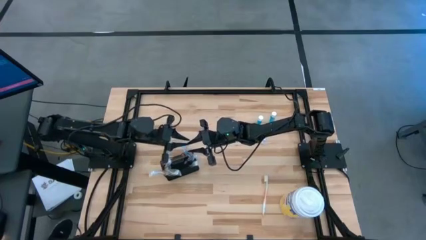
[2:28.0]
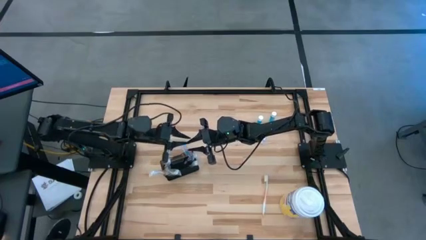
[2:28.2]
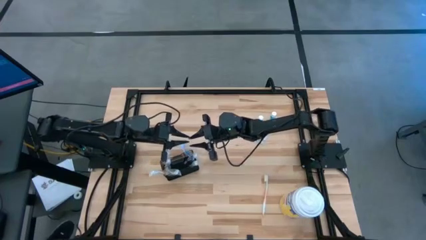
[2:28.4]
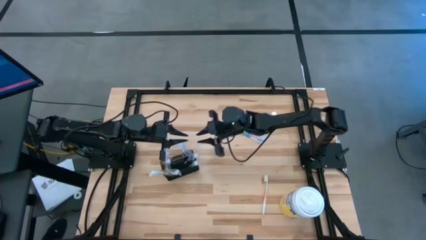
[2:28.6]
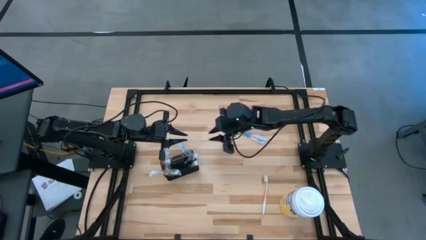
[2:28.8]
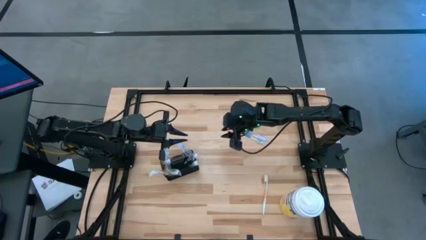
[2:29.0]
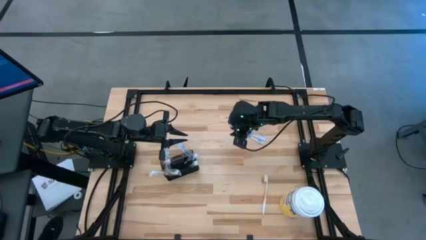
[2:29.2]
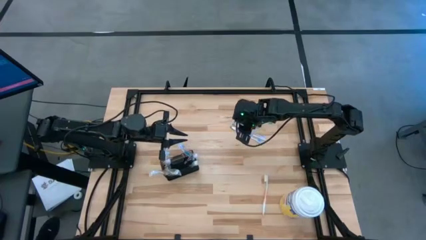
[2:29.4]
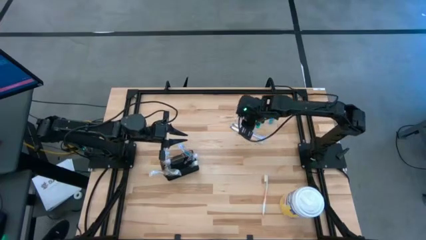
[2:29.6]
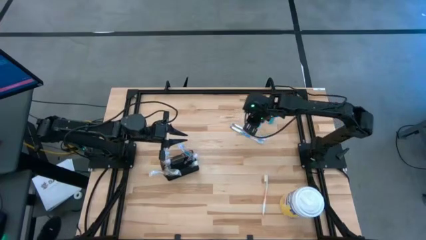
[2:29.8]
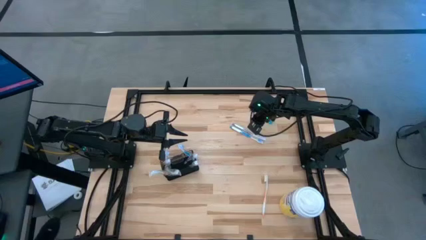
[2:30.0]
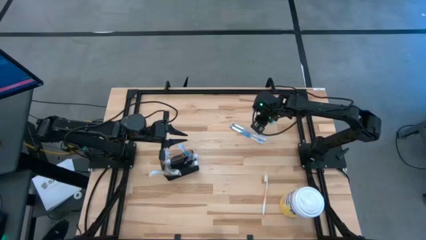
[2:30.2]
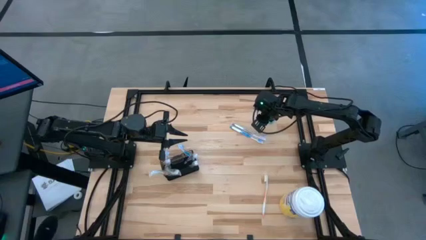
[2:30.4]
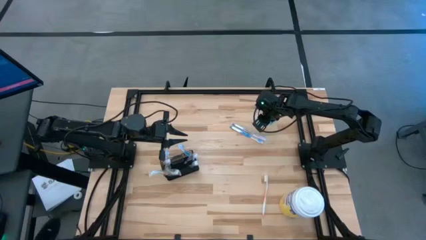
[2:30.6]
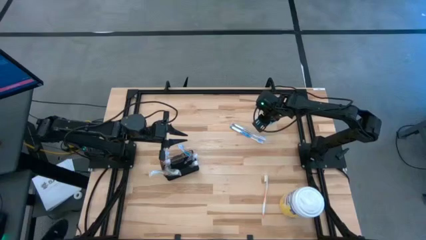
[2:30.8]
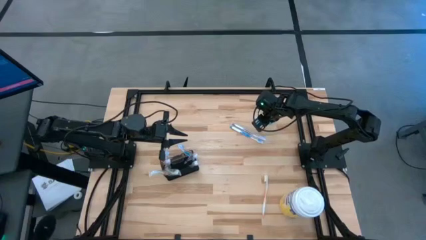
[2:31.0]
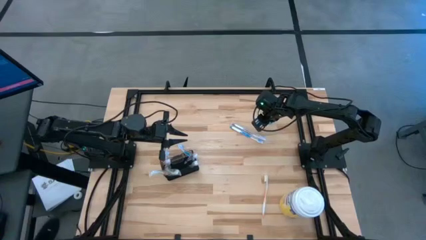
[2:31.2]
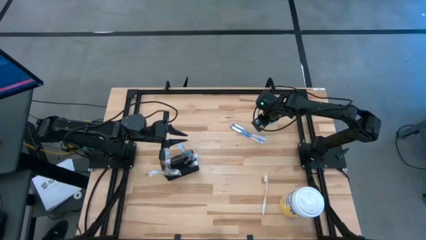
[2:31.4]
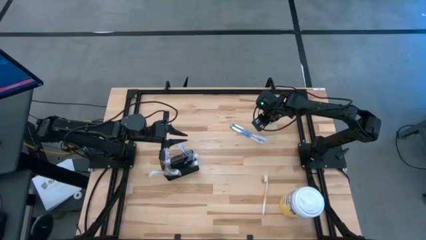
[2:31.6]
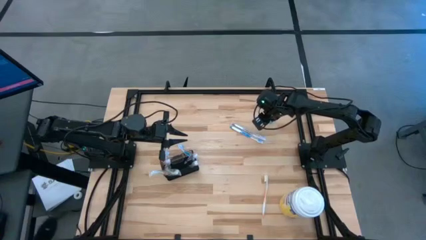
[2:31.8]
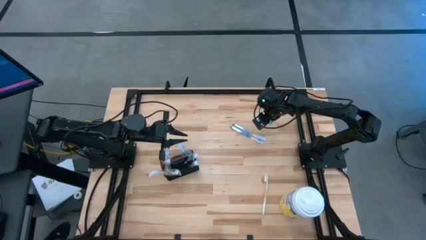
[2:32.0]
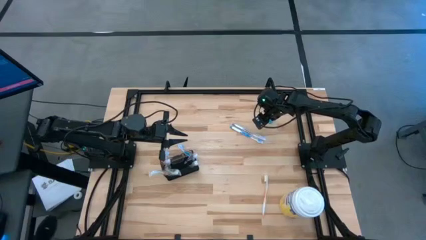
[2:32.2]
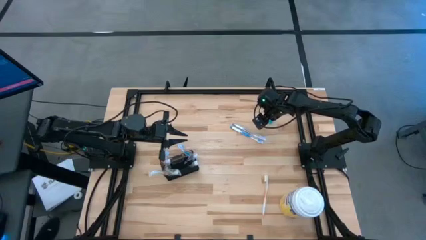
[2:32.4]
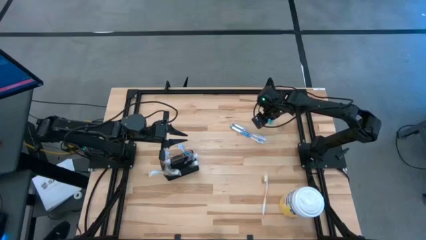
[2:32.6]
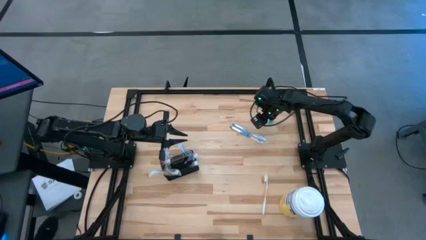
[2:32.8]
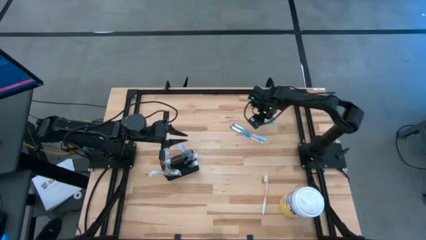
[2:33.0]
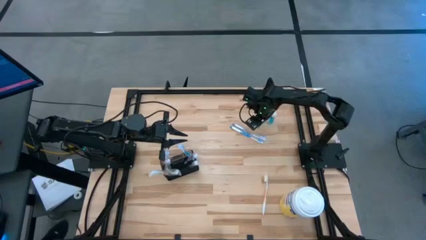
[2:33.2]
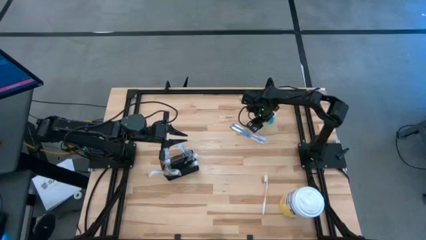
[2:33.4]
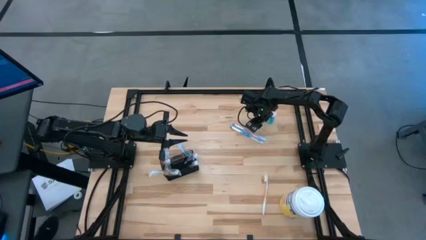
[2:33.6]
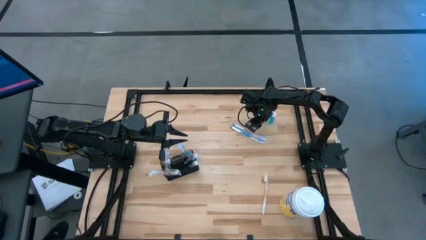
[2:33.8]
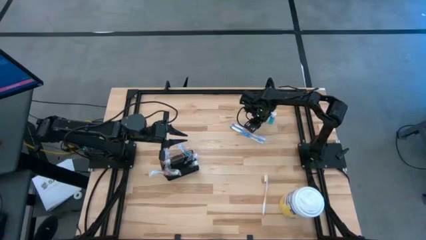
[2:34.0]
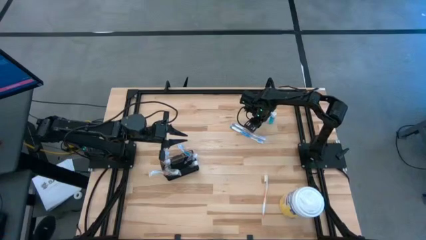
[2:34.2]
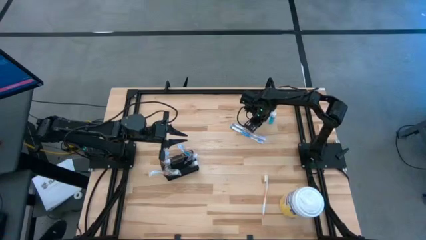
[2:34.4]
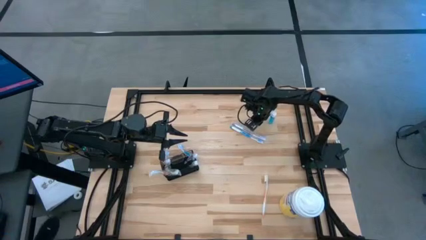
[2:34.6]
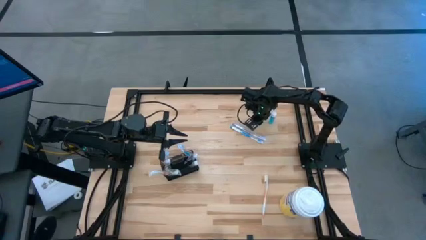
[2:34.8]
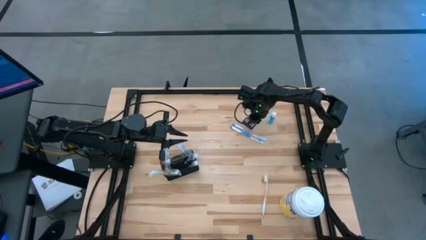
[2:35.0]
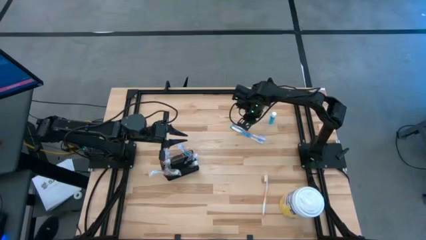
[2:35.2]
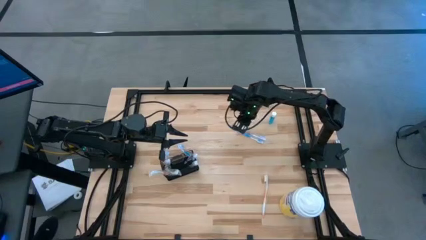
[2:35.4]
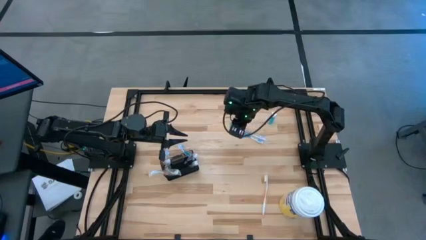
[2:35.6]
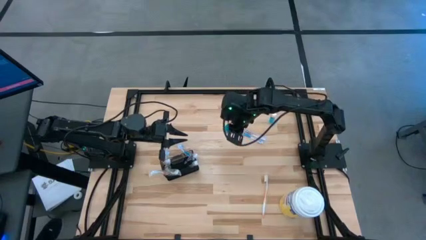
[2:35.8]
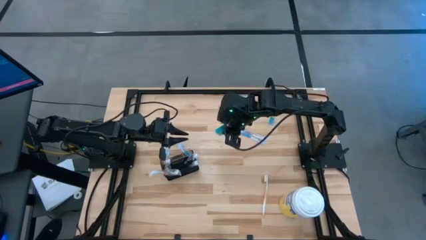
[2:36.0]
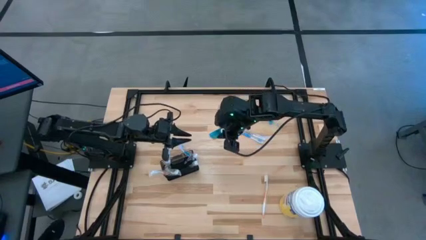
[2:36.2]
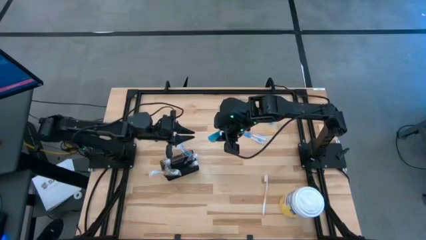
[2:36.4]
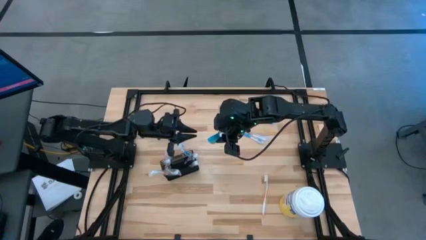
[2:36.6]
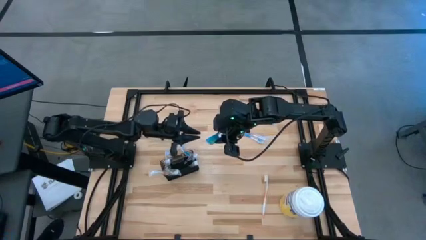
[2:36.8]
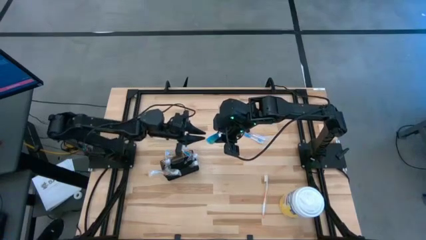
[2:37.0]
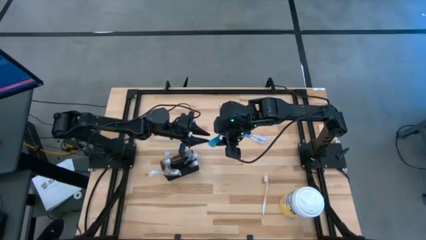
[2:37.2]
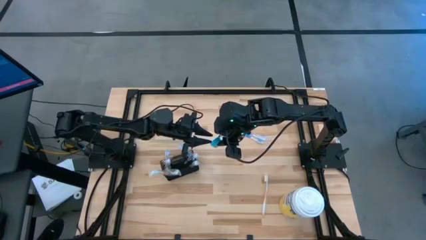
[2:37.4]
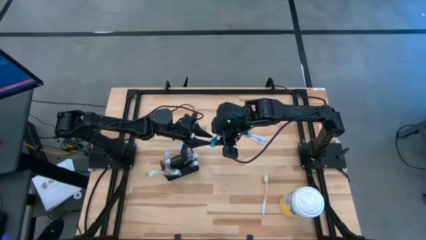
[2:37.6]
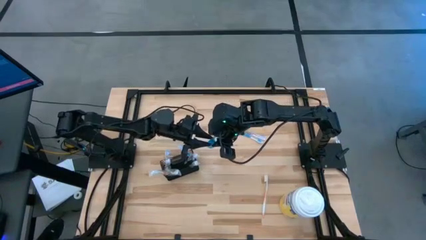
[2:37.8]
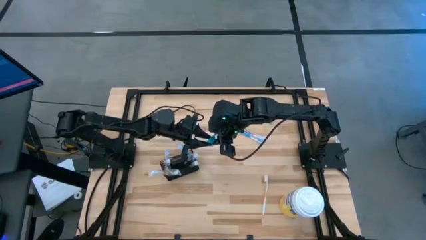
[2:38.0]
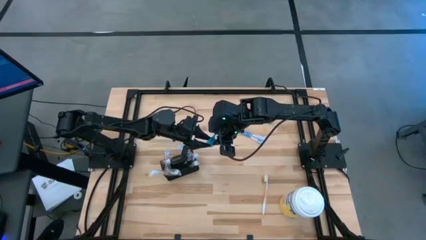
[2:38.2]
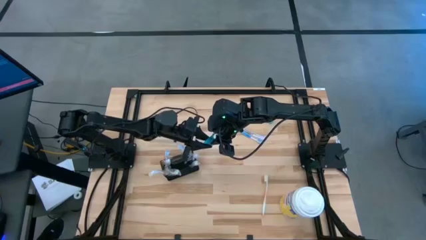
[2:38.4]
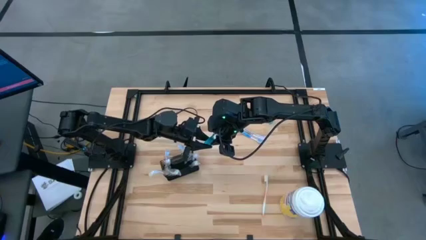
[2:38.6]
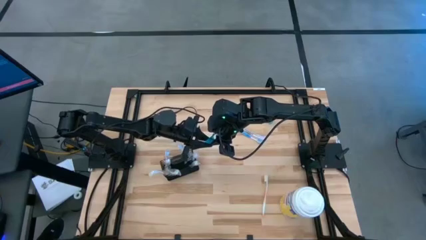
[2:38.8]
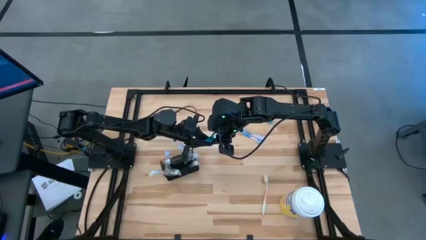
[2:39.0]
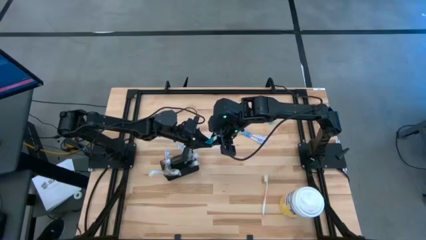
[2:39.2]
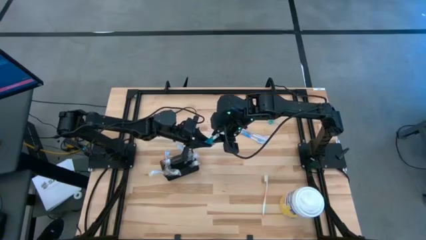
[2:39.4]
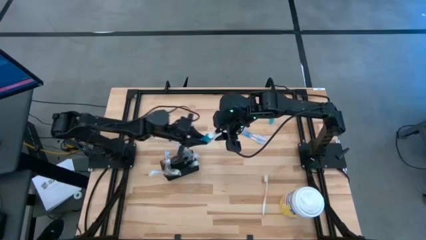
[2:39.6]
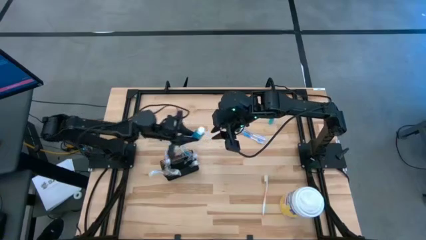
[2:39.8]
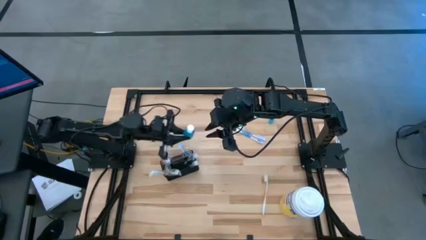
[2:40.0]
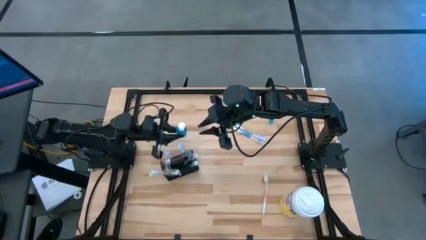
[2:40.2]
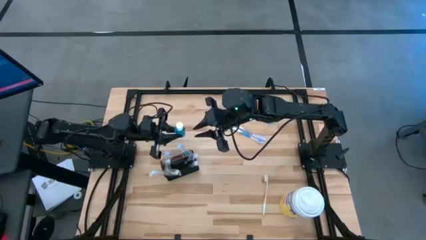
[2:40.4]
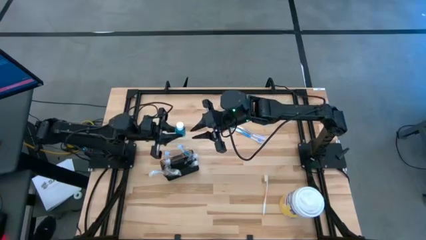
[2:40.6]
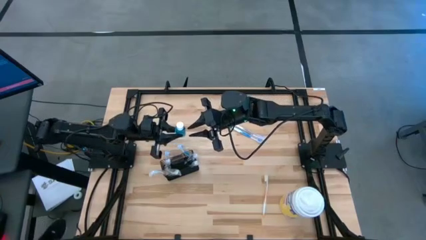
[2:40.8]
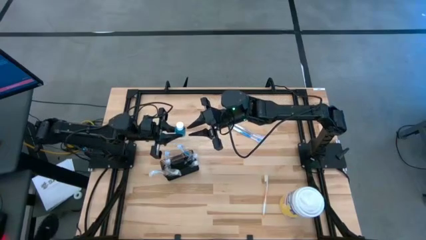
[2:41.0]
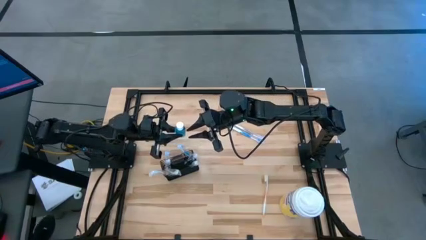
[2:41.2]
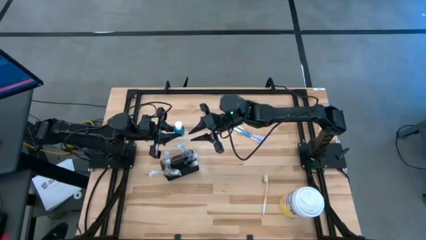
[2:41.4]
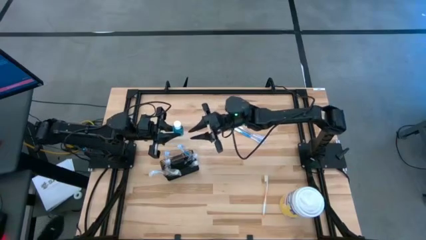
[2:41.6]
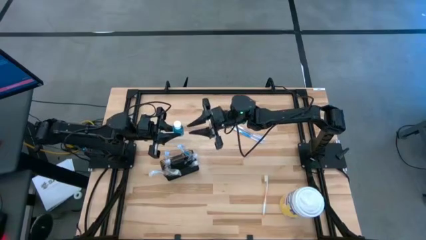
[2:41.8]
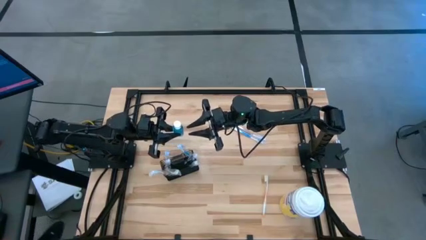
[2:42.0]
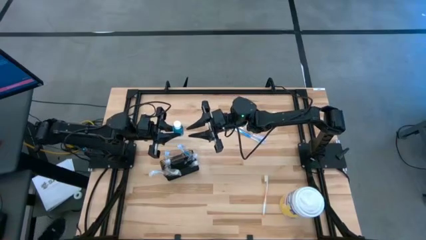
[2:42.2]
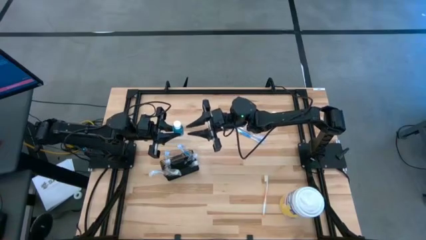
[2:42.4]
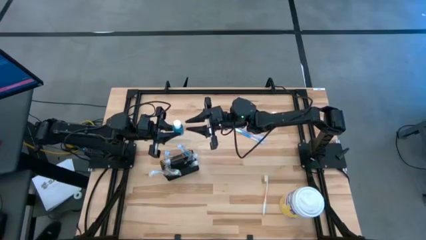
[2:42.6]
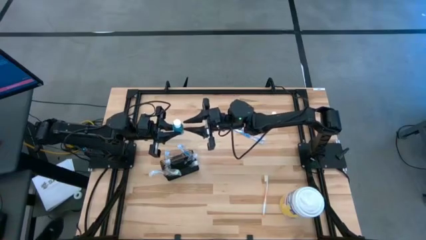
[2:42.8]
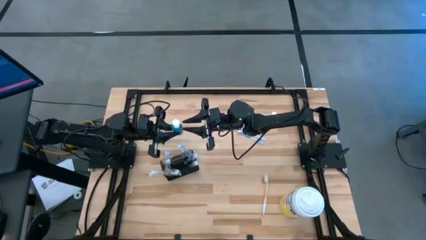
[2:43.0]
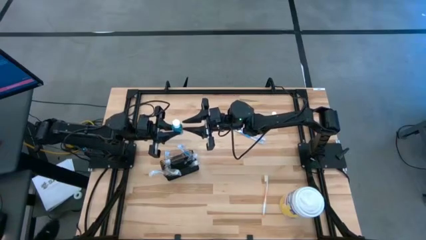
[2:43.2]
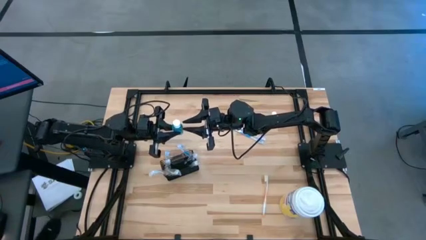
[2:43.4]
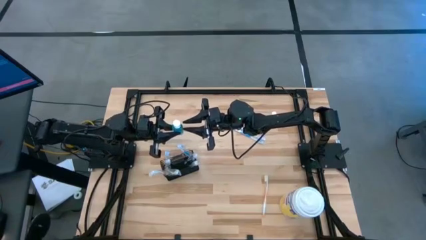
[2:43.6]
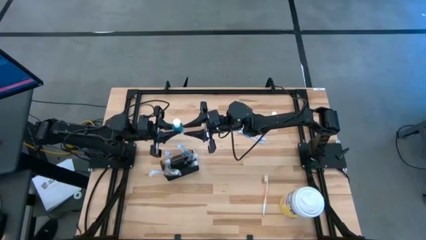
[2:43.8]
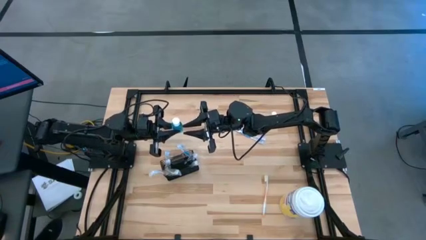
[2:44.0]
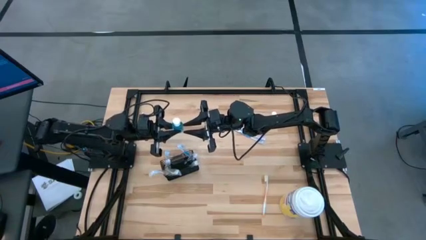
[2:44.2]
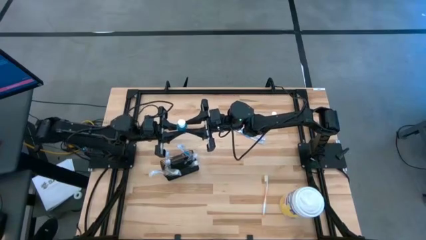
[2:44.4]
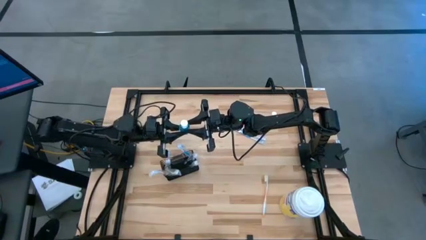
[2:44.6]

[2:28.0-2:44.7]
Task: Pick & Place toothbrushing station
Put the left mouthwash into the middle section of the mesh organizer
